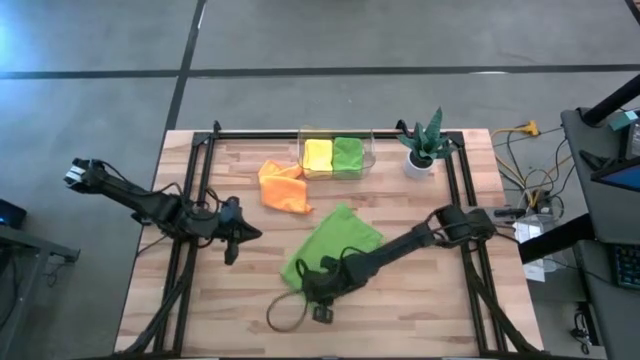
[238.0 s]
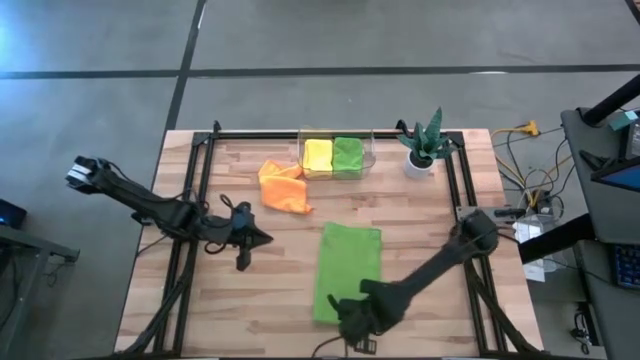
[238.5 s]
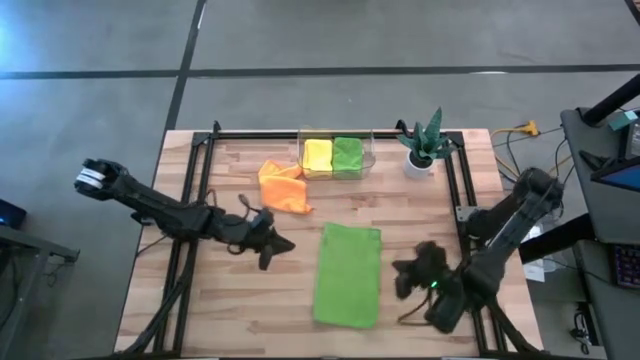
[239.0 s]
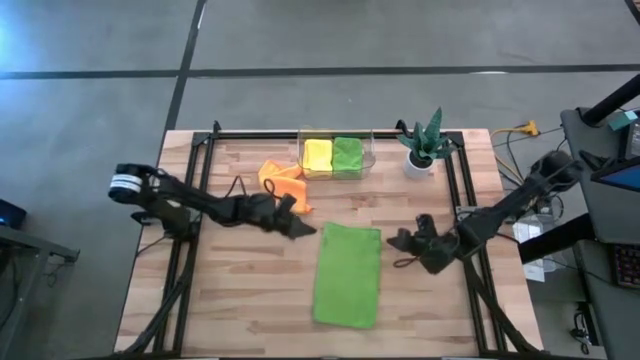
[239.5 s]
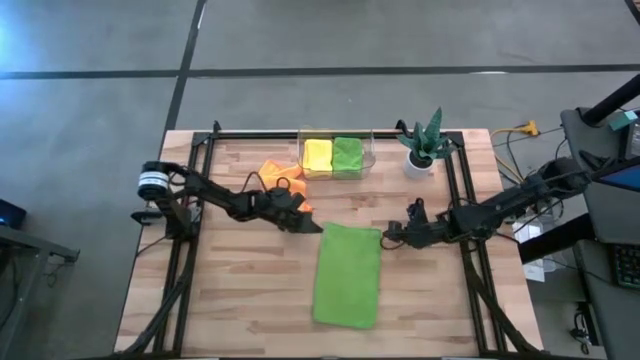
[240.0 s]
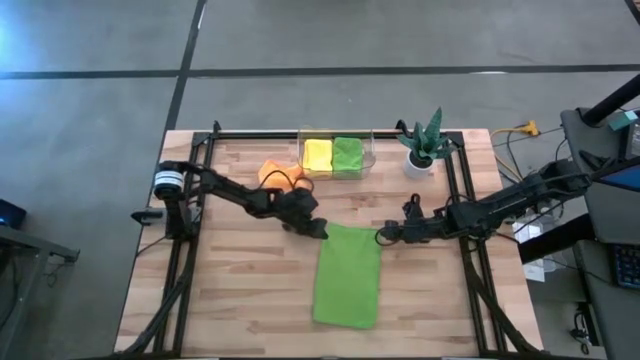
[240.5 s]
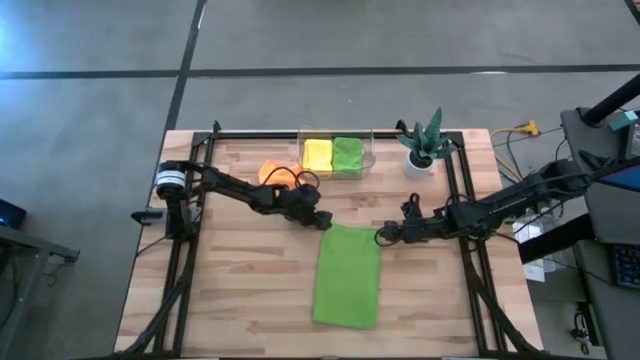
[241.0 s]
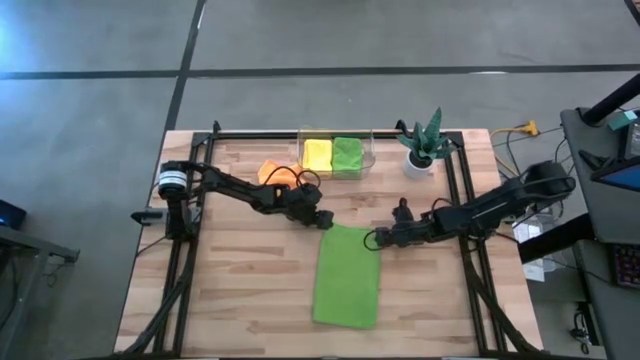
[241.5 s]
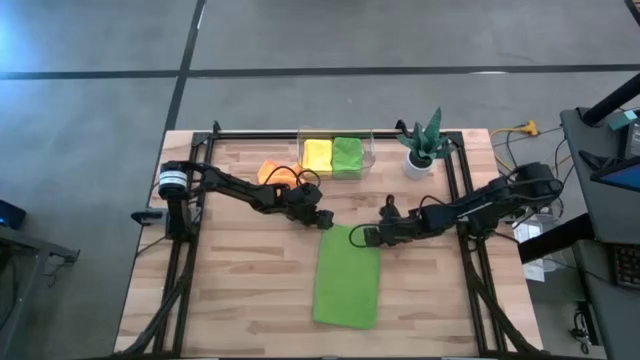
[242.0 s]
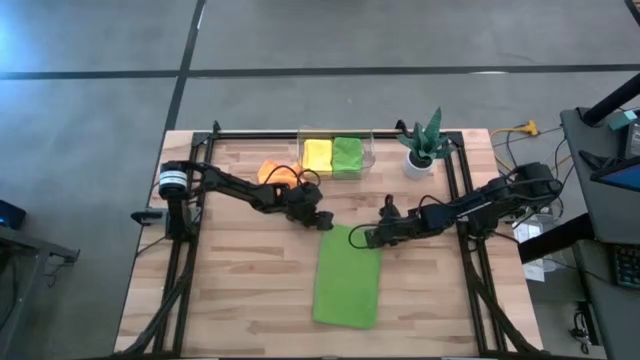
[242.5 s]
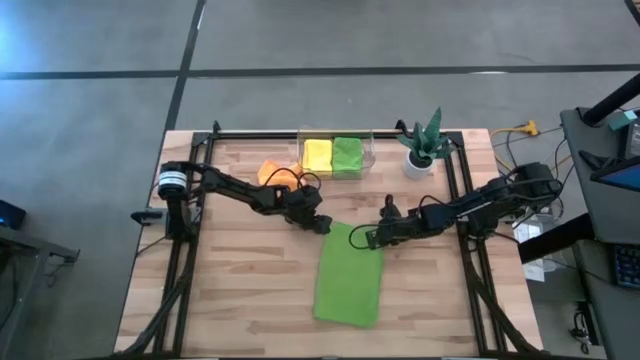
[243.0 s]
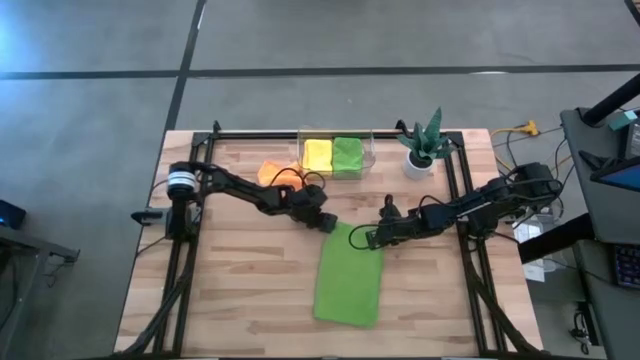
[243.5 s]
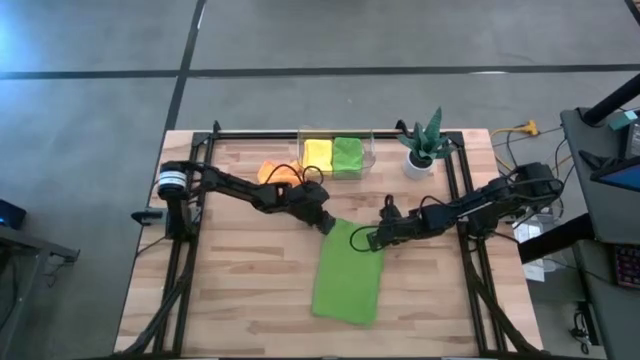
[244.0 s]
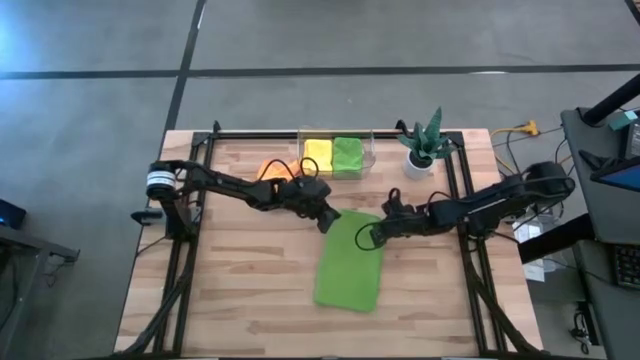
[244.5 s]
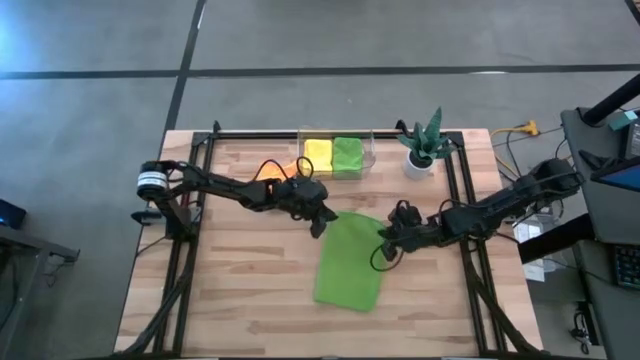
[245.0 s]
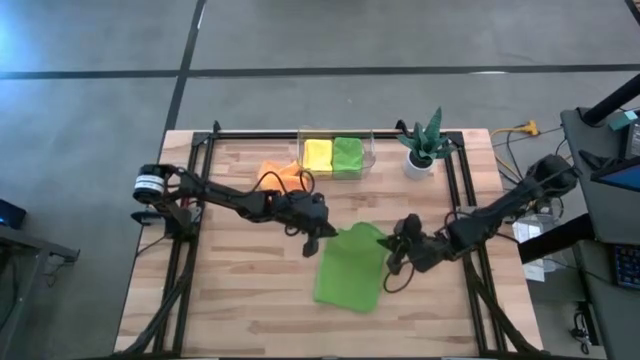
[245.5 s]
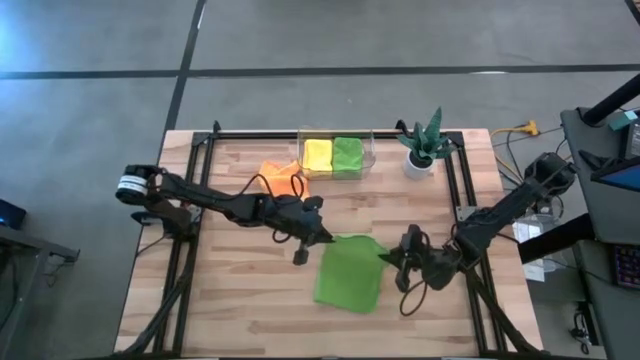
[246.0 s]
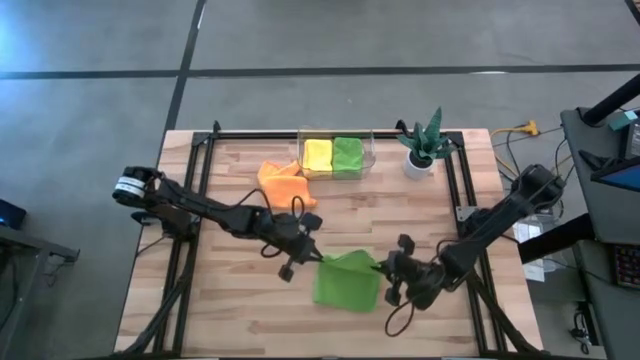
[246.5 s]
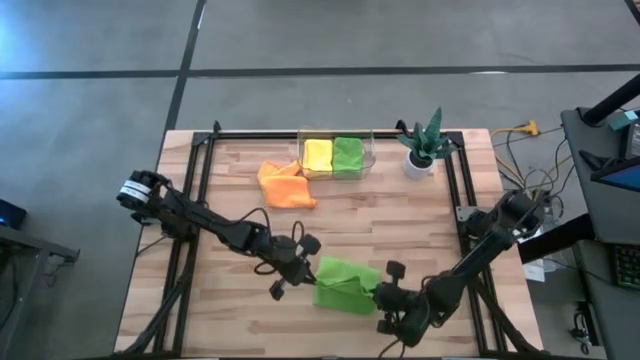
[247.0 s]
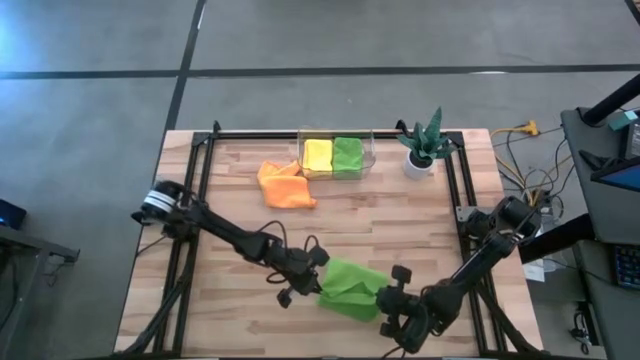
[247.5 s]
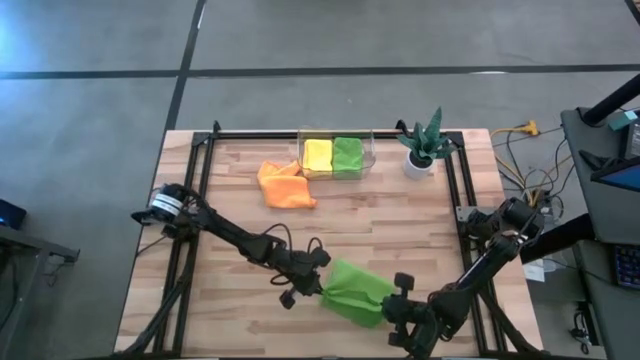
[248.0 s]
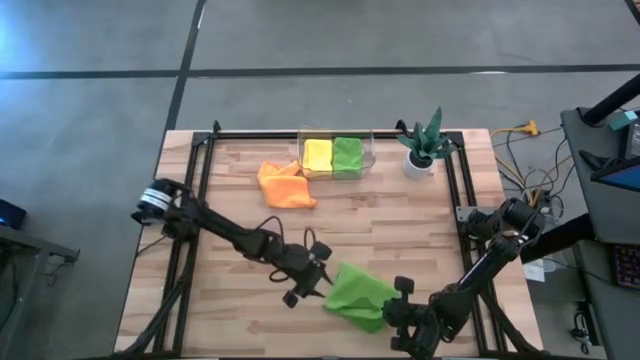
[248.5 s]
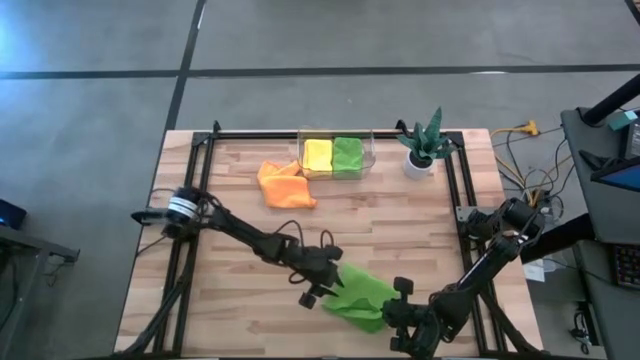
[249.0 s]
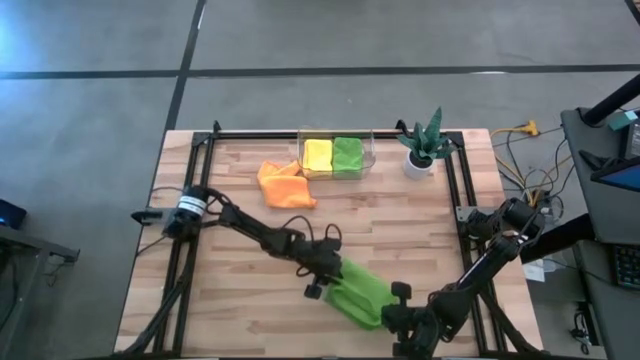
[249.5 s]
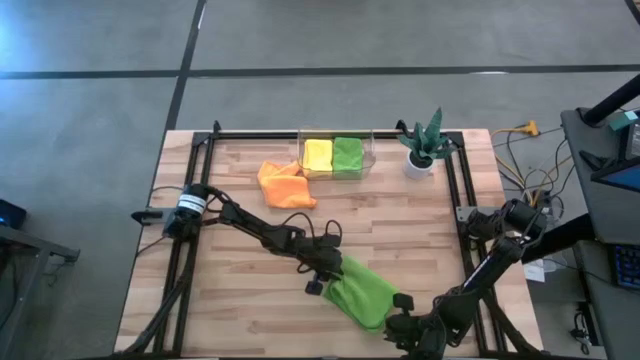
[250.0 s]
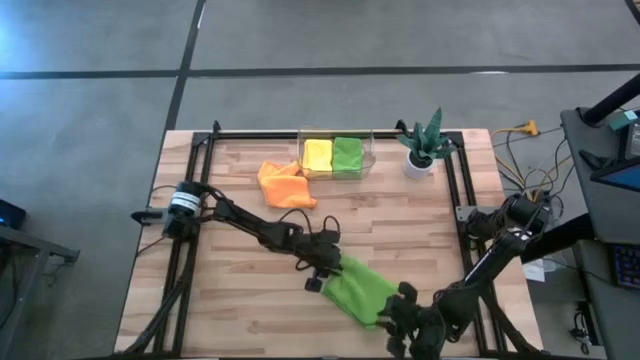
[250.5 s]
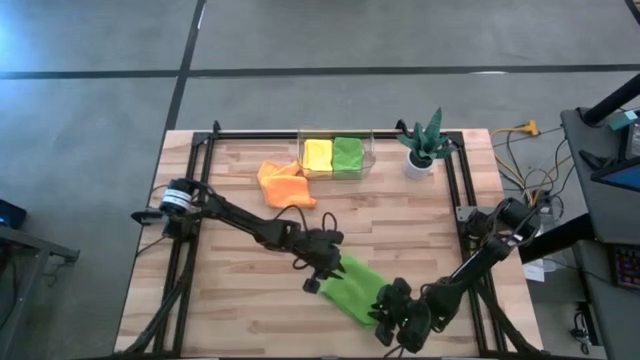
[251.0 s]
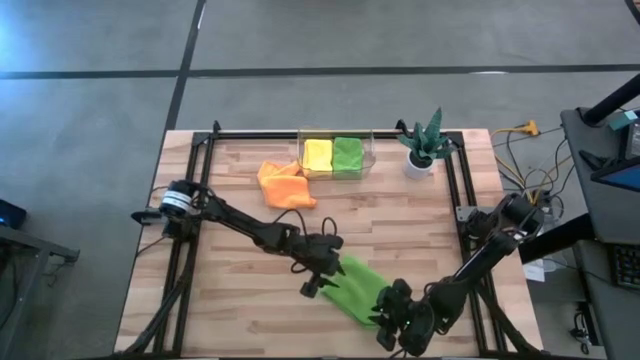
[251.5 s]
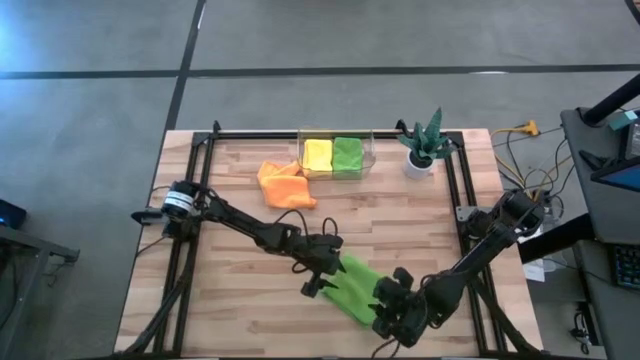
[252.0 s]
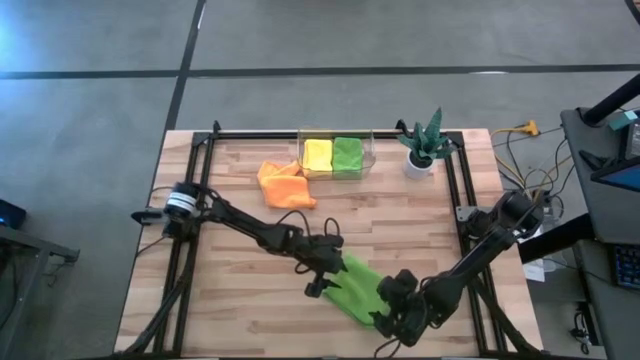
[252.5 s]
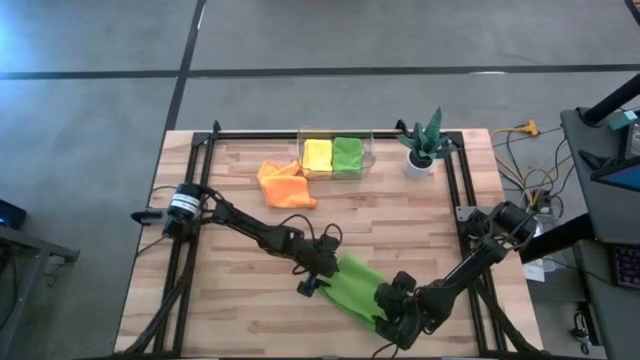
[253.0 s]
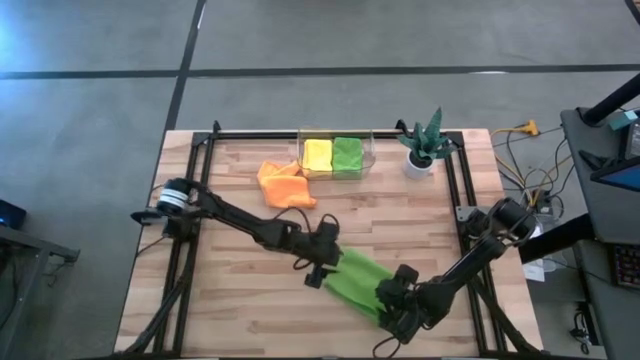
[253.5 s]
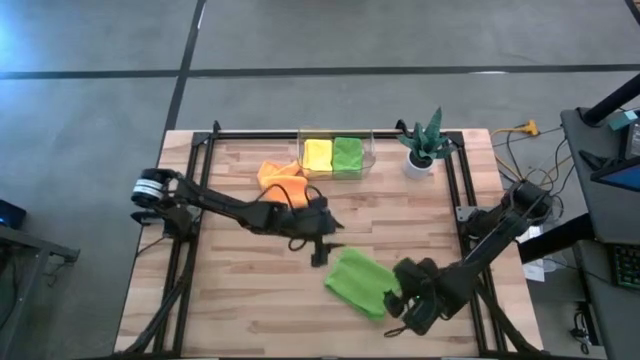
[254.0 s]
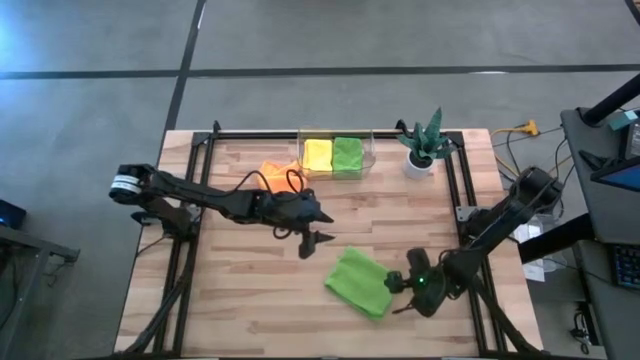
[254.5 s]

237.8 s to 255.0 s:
Task: Fold microfiber towels
Fold the green microfiber towel

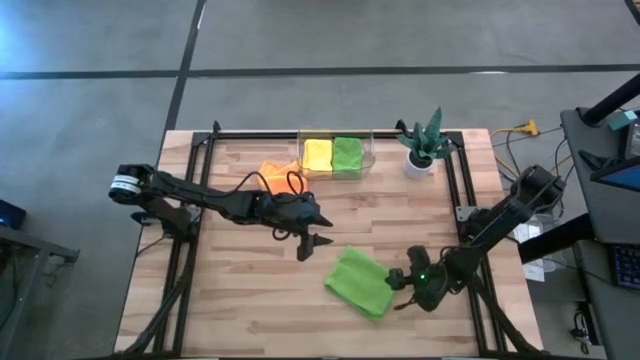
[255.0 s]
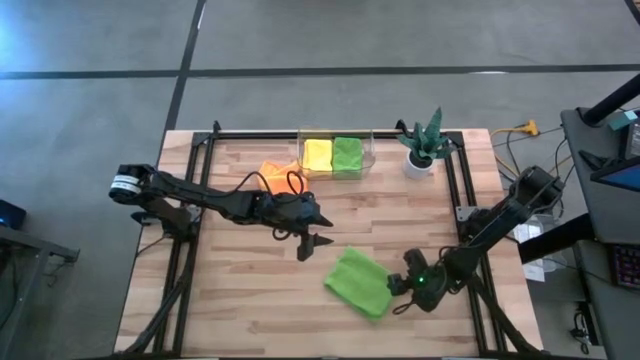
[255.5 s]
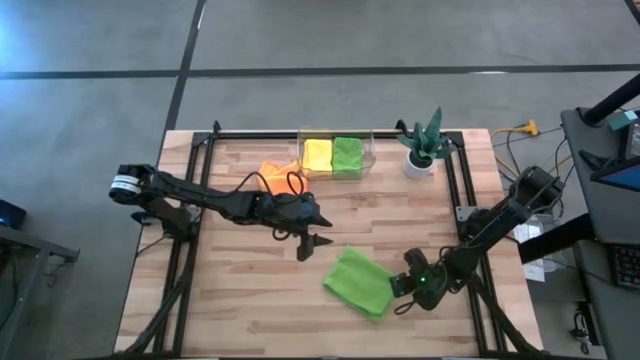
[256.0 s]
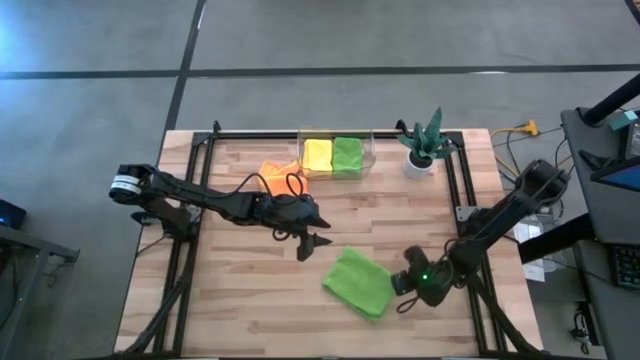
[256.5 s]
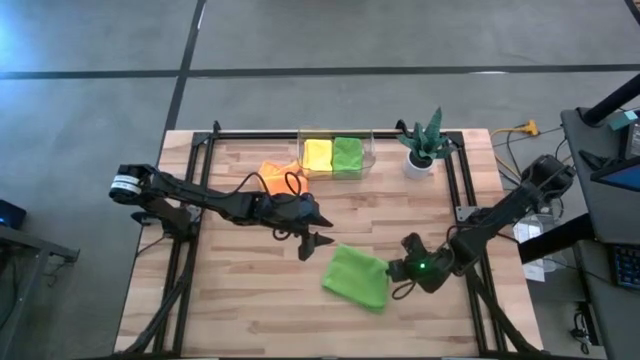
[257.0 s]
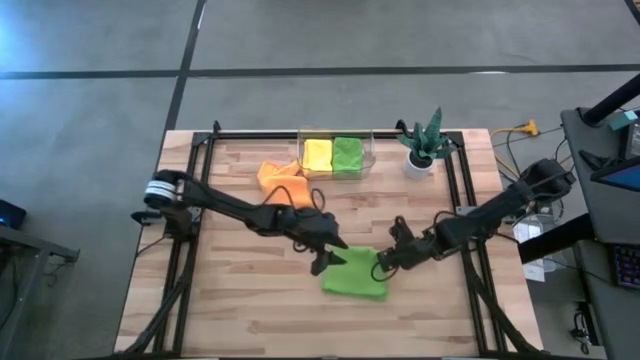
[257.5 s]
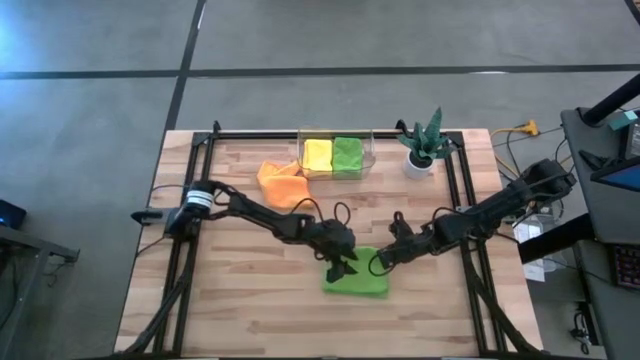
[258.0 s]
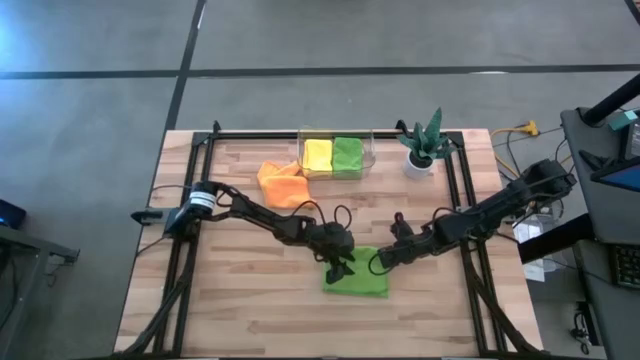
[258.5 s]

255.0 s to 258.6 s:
Fold the green microfiber towel

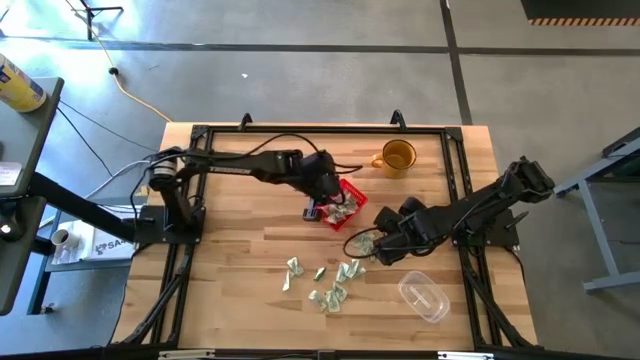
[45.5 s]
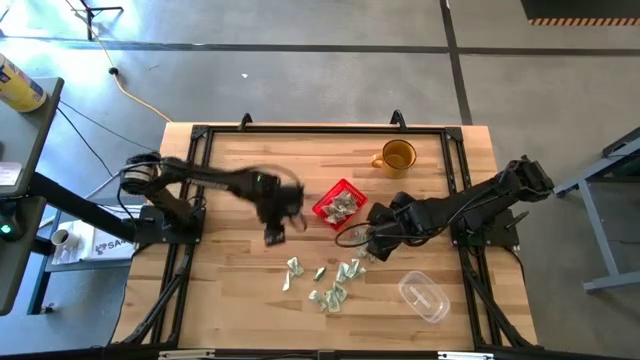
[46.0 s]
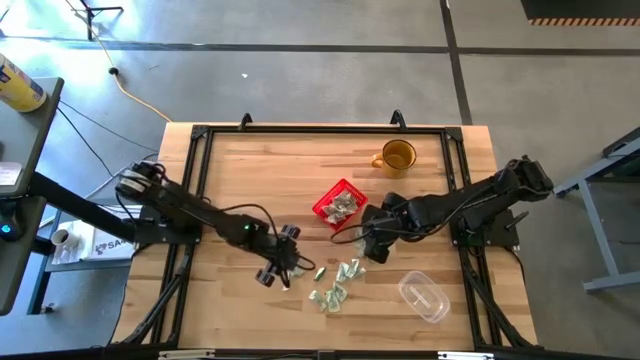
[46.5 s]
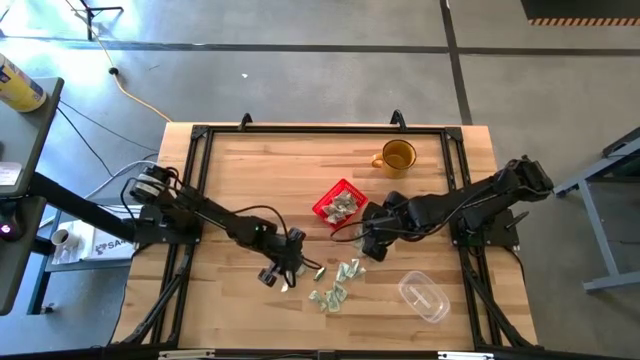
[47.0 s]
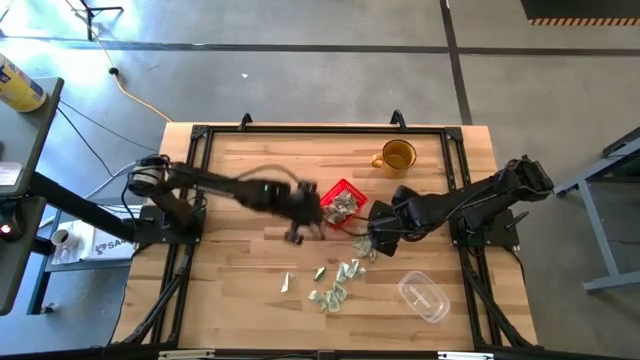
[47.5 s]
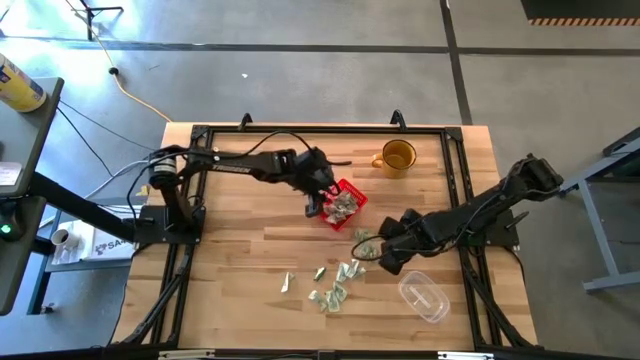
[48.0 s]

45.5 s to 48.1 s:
Task: Pick and place items into bin
Put the white stevia packet into the red bin
